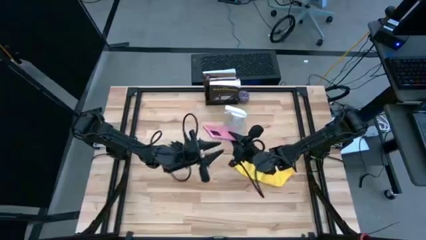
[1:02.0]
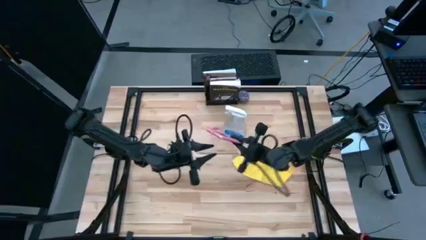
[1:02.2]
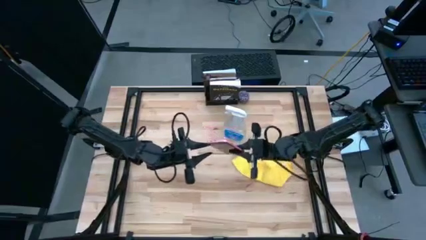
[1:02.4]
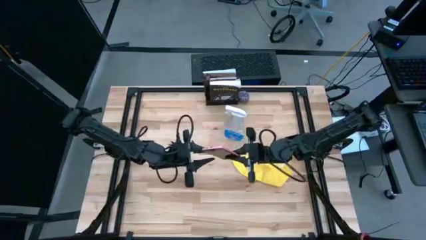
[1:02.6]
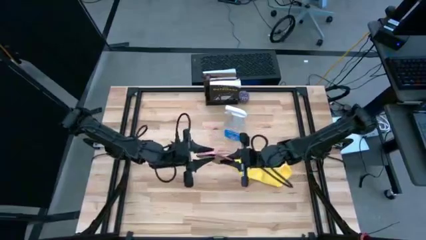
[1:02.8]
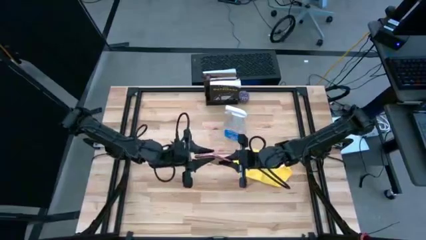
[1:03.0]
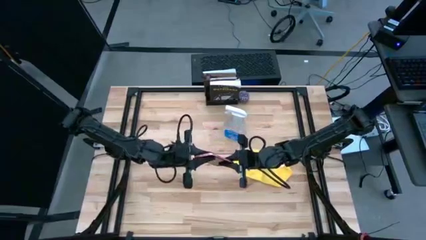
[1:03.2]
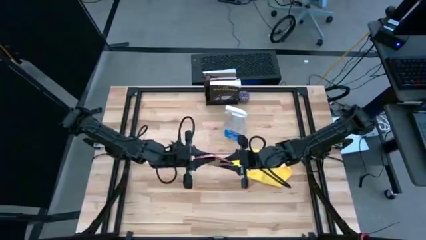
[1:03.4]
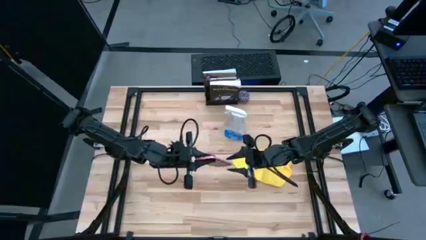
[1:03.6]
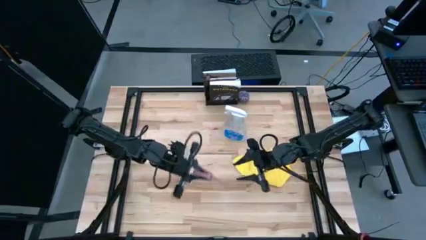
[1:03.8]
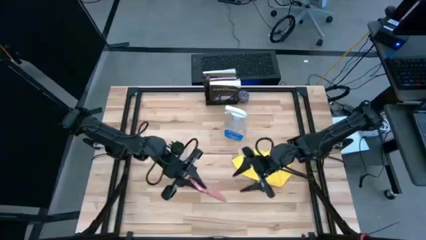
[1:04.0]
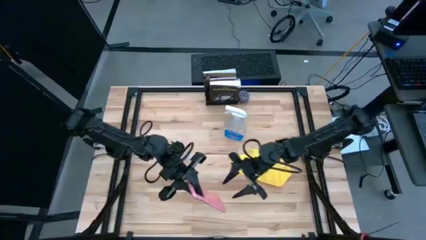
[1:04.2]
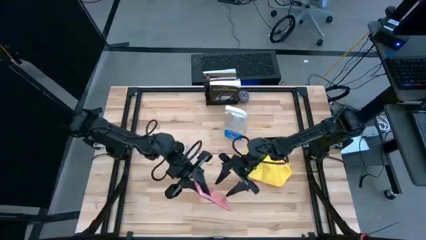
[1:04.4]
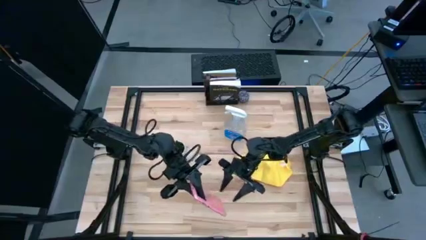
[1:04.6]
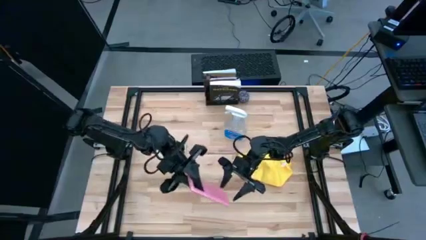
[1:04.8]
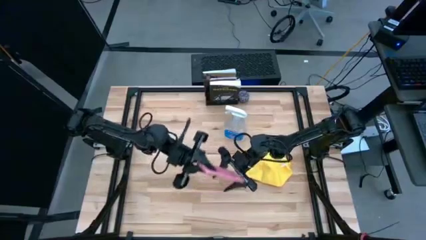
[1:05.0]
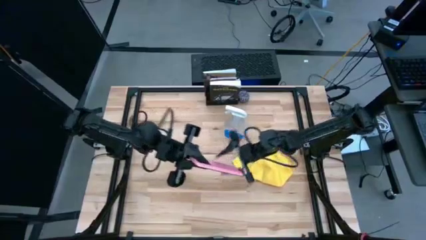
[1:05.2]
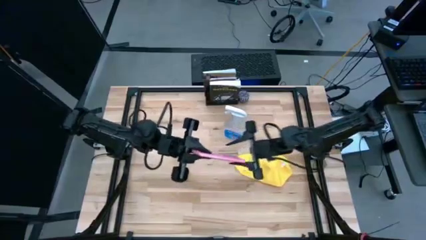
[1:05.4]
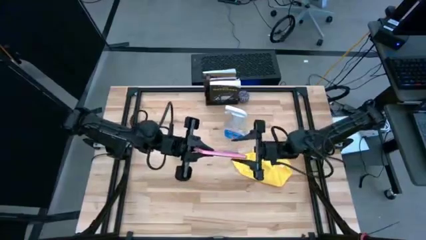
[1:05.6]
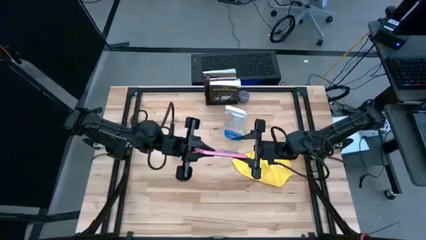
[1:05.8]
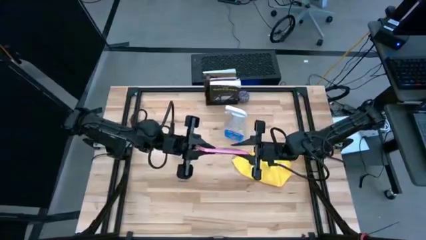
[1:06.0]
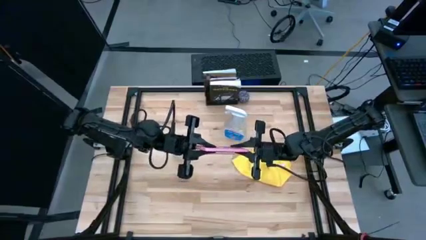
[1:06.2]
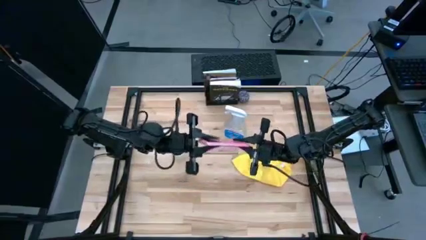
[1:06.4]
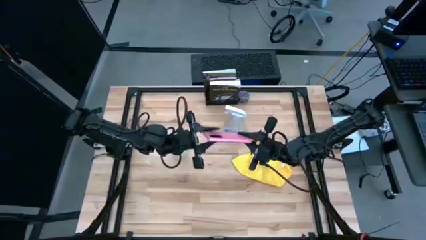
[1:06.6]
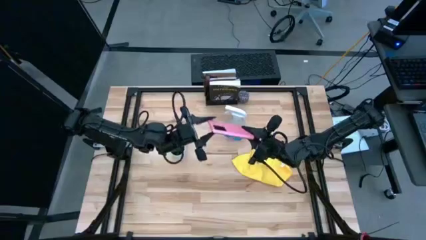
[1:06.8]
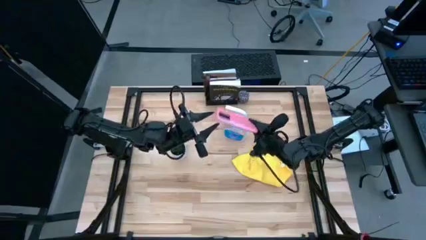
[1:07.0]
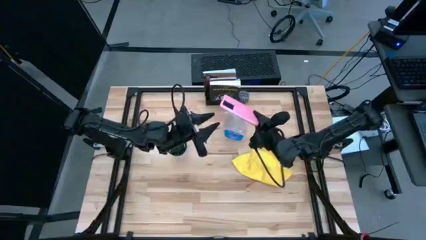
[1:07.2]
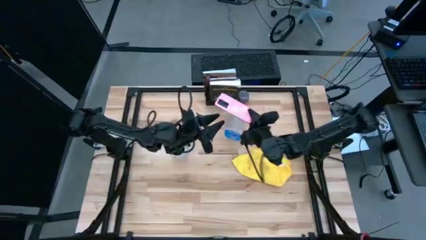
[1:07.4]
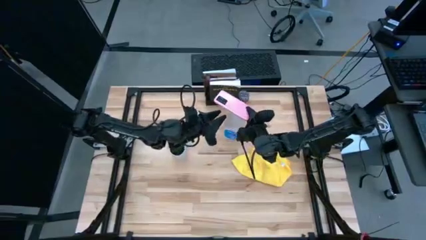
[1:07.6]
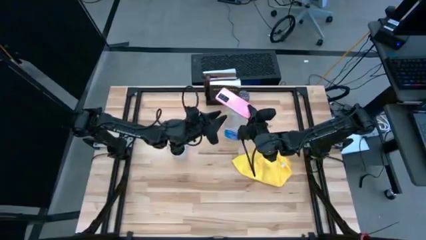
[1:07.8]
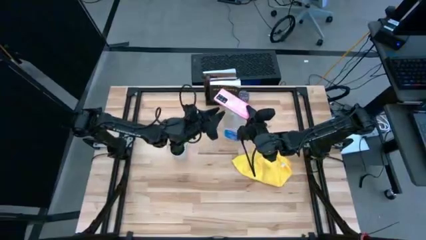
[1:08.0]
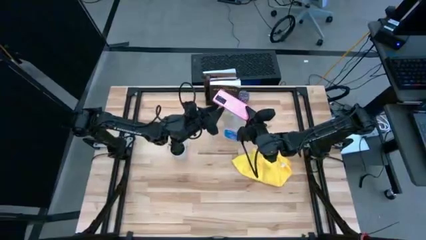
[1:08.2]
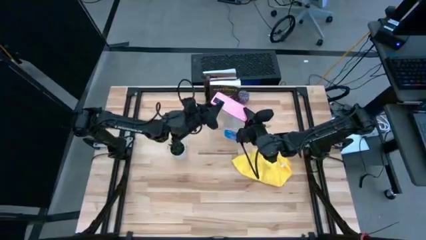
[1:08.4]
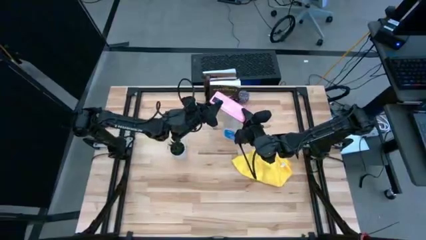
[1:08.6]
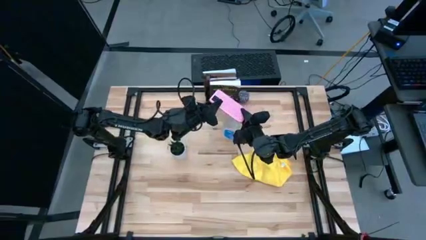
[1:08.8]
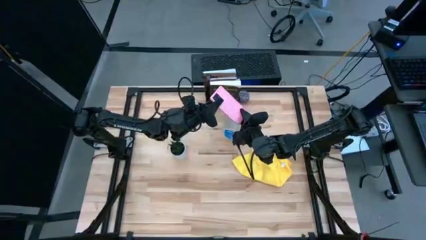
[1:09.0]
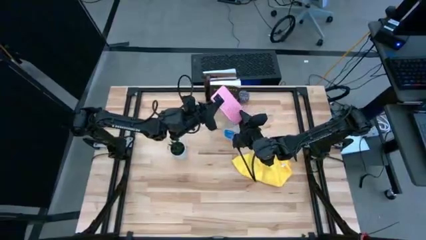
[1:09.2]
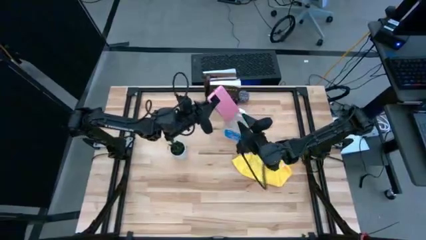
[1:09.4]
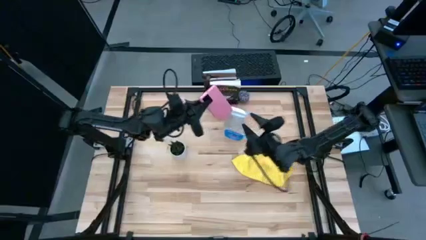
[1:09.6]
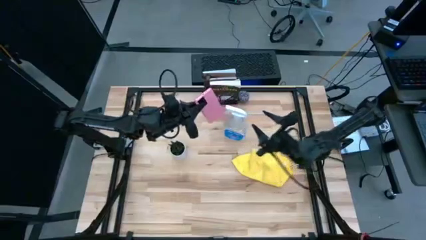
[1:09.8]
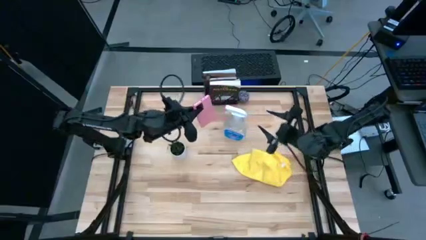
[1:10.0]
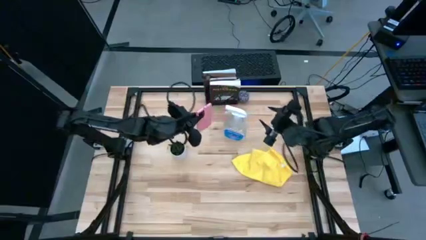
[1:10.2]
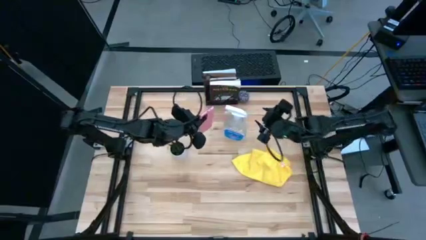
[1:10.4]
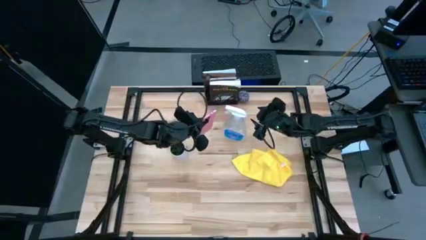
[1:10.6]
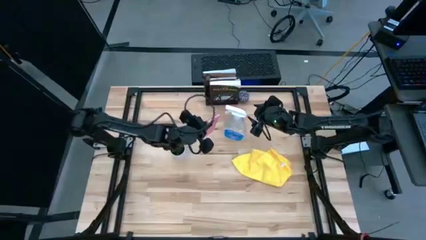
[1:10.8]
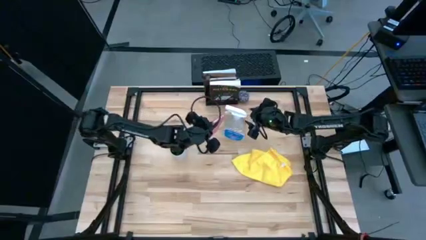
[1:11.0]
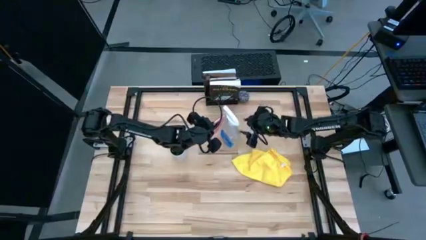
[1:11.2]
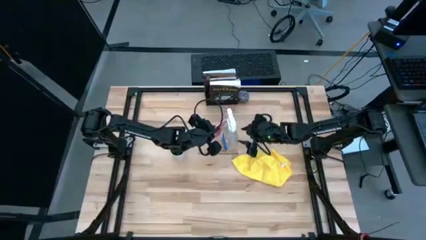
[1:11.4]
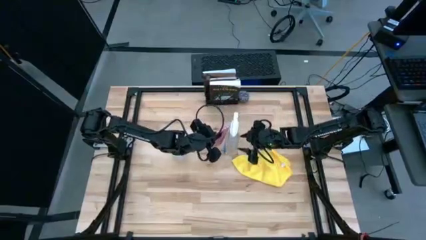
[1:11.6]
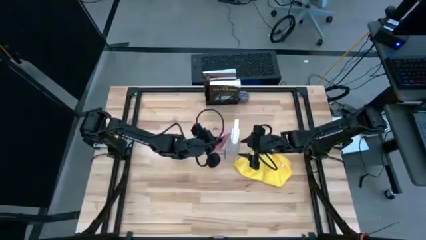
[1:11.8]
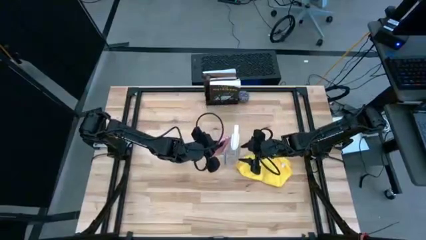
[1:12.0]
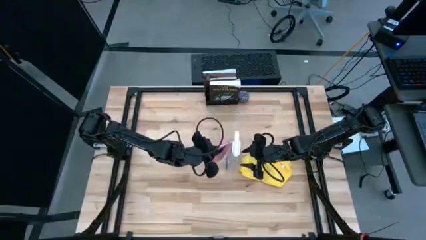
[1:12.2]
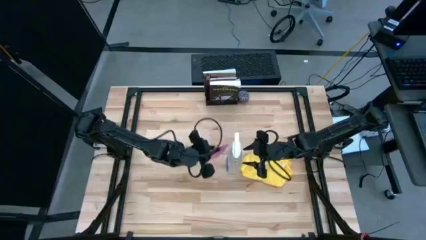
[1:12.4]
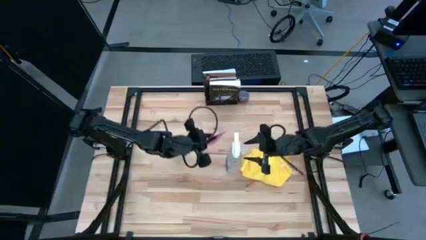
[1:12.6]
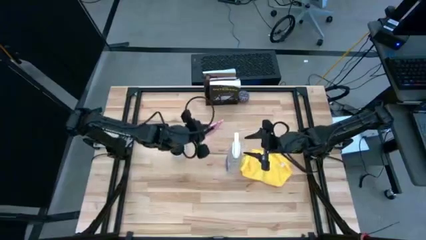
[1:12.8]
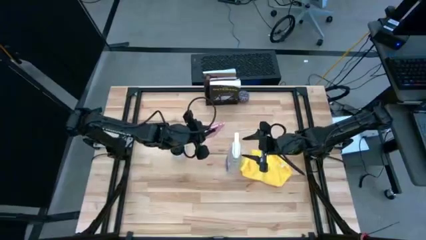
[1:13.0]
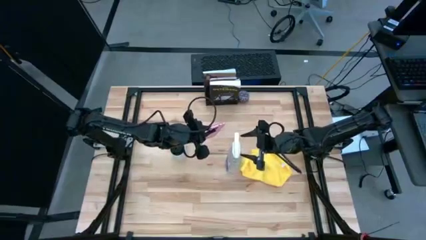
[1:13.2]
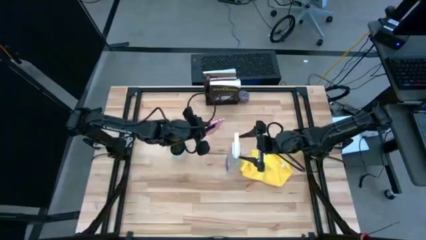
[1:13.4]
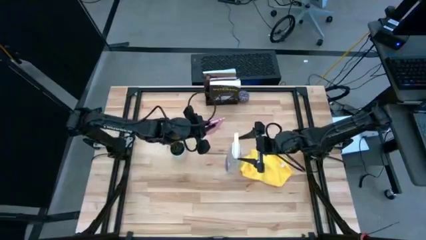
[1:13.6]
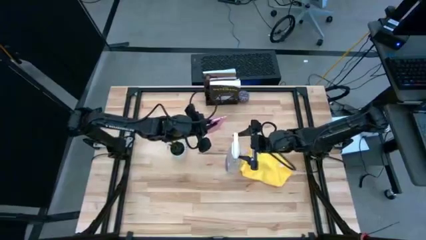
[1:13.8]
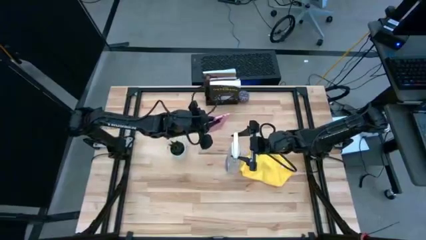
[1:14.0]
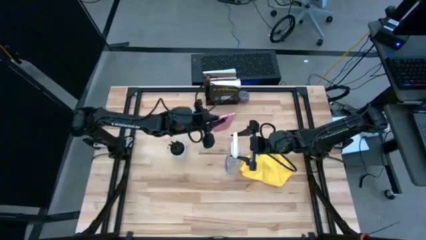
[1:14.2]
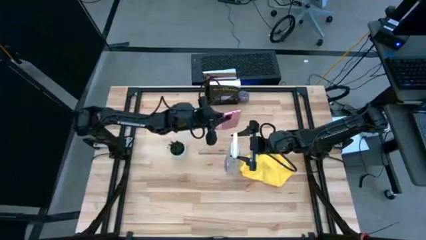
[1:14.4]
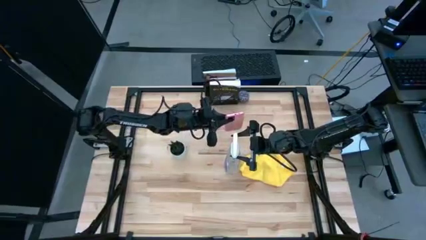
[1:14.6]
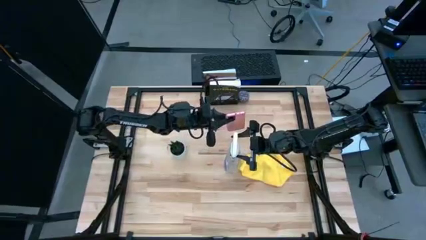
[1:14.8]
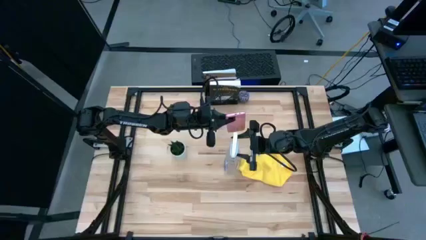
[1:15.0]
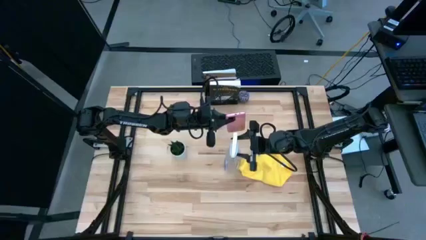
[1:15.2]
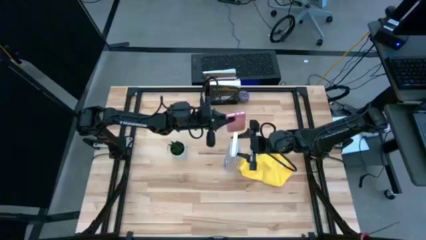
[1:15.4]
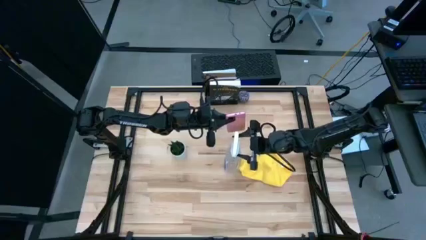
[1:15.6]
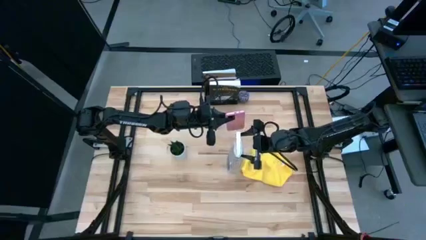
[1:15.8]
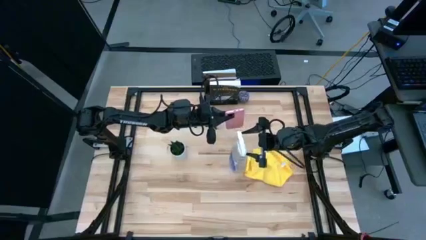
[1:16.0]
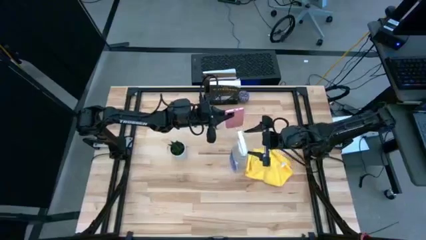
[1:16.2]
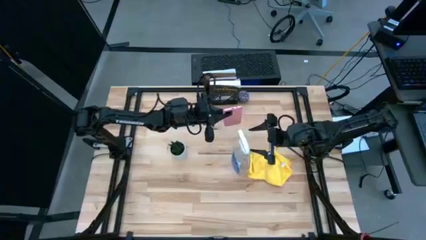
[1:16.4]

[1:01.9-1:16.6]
Task: Apply microfiber cloth
Spray the back of the cellphone using the spray bottle

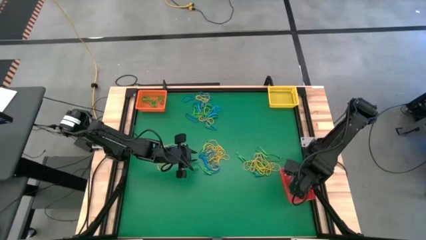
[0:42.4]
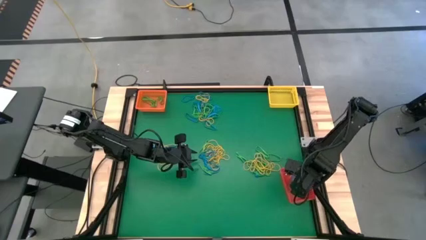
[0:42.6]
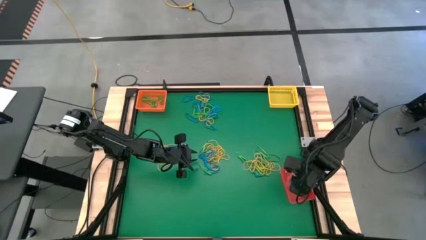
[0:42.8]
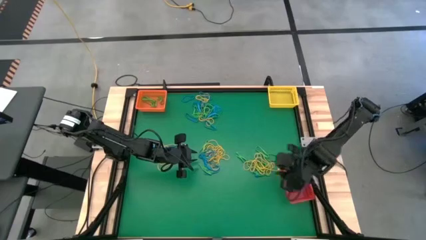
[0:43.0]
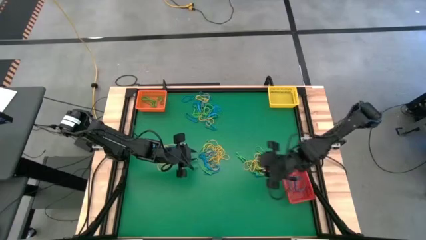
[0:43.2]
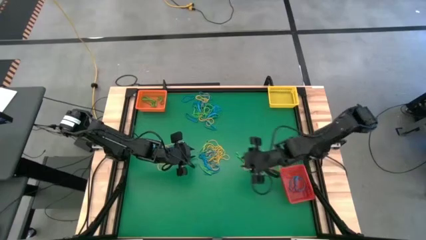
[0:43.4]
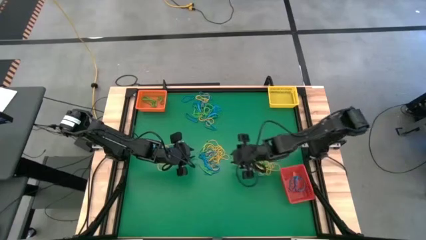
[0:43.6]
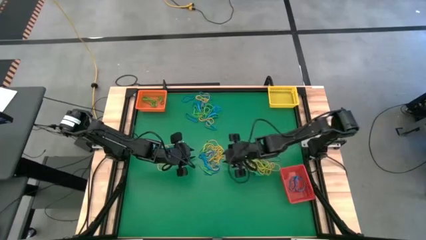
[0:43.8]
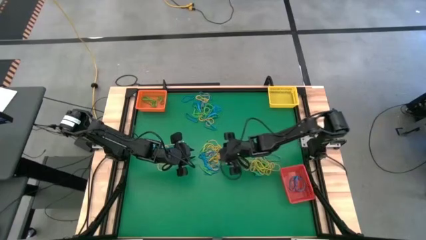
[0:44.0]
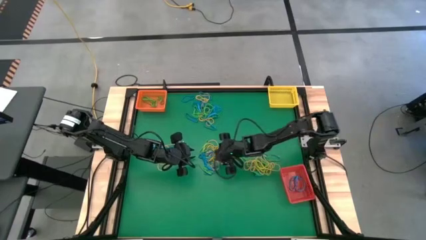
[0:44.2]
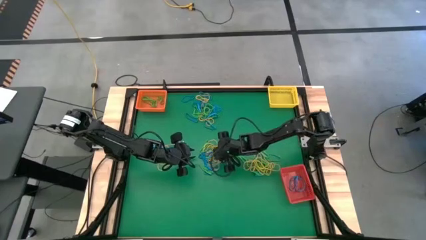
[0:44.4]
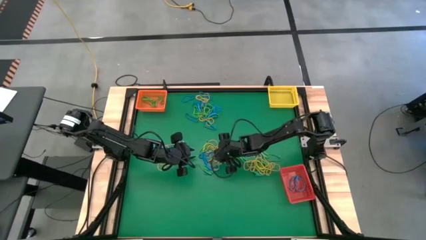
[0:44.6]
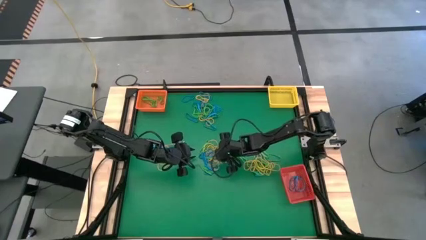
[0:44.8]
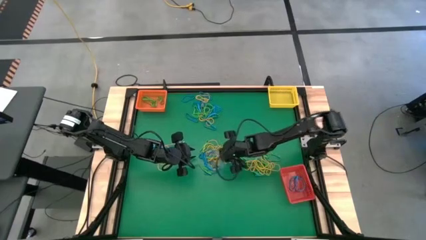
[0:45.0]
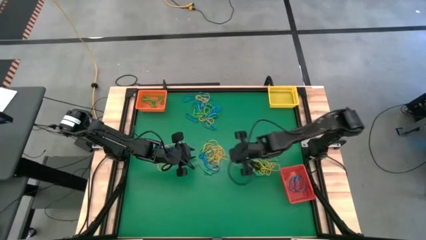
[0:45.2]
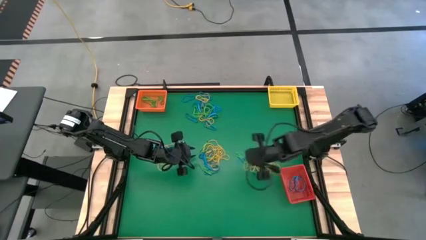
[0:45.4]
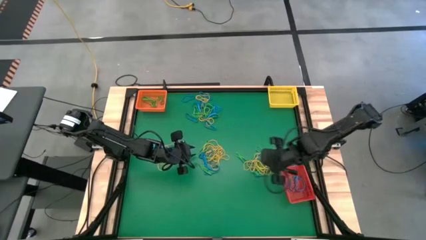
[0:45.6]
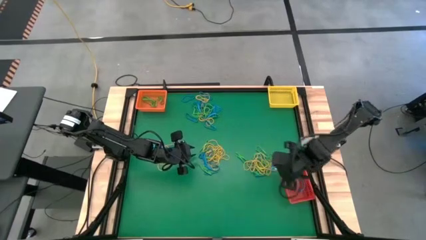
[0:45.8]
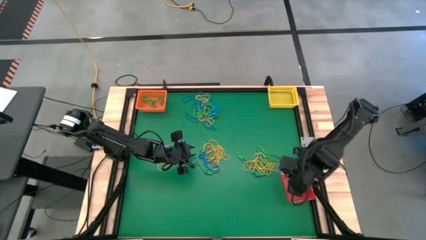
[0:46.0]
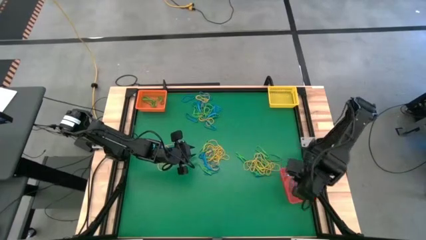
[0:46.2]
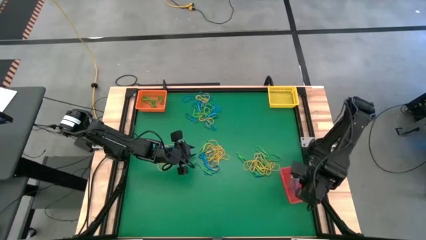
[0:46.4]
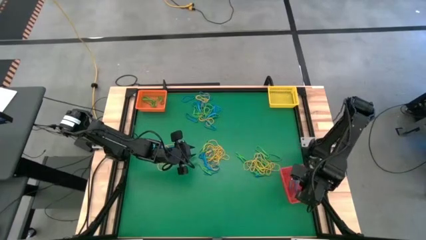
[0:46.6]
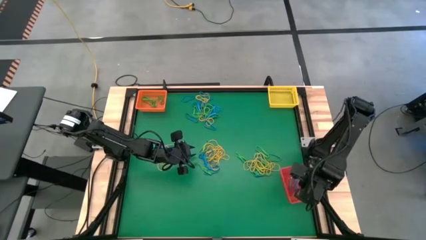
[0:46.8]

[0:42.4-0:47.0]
Task: Sort rubber bands into baskets
Put the blue rubber band into the red bin
